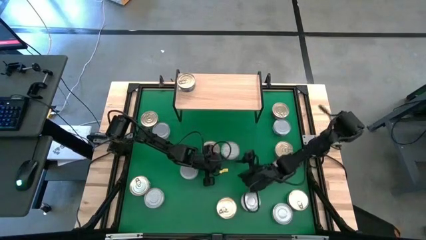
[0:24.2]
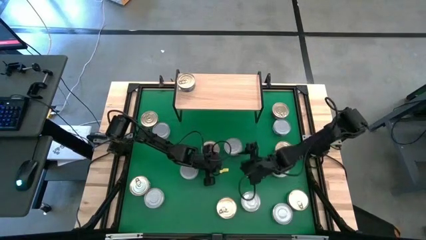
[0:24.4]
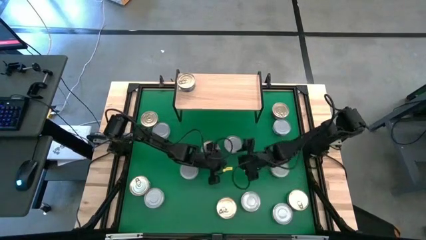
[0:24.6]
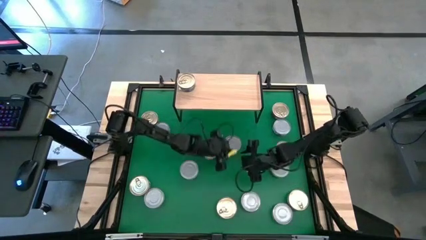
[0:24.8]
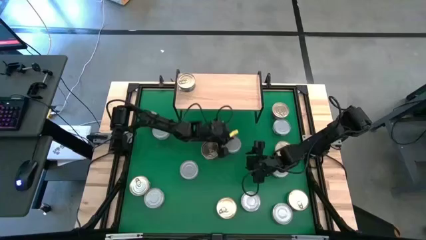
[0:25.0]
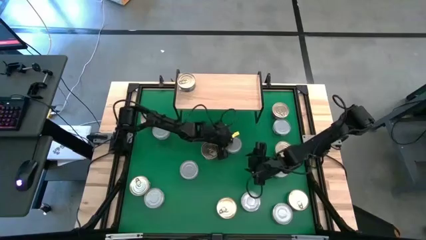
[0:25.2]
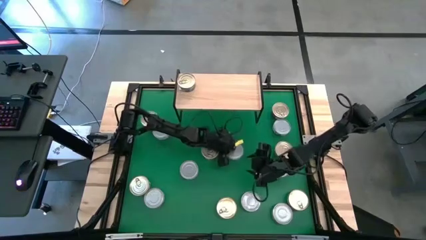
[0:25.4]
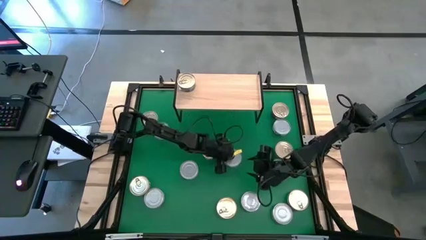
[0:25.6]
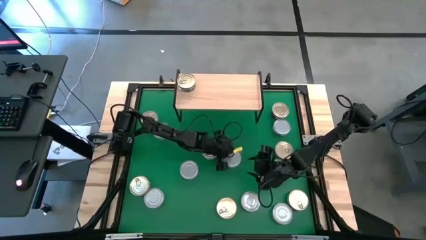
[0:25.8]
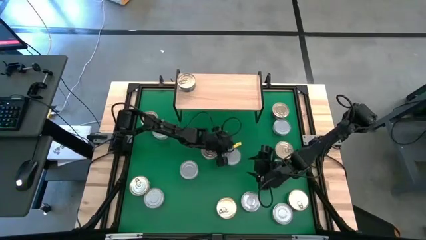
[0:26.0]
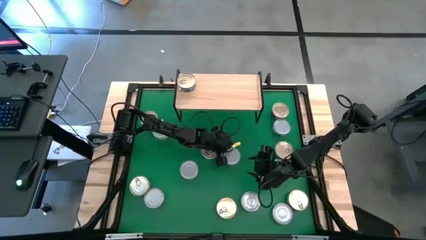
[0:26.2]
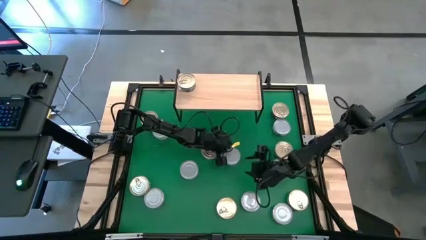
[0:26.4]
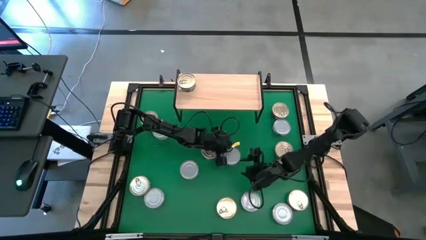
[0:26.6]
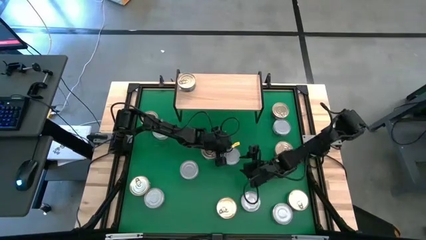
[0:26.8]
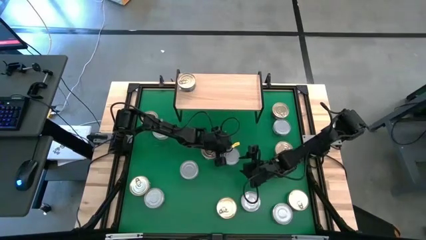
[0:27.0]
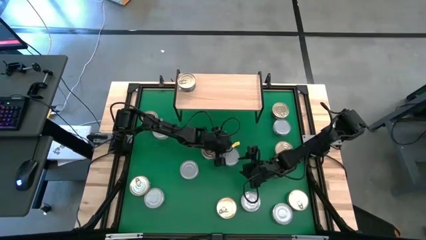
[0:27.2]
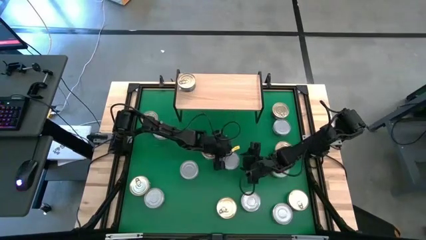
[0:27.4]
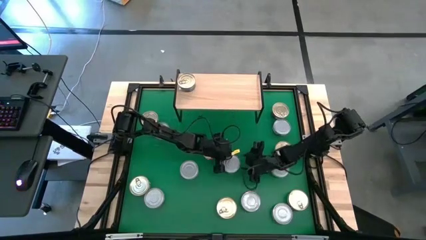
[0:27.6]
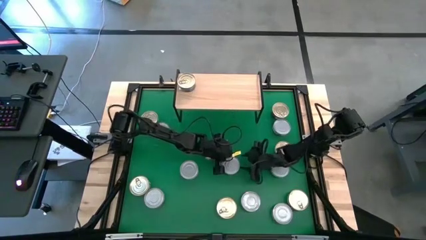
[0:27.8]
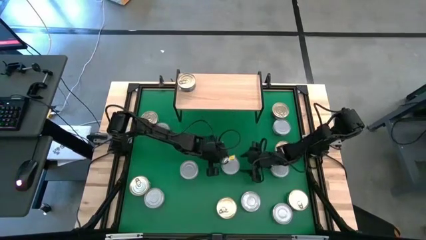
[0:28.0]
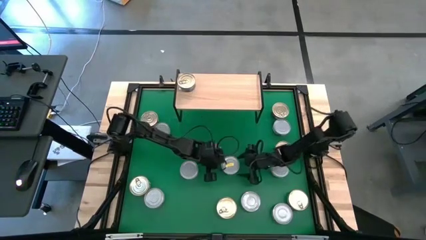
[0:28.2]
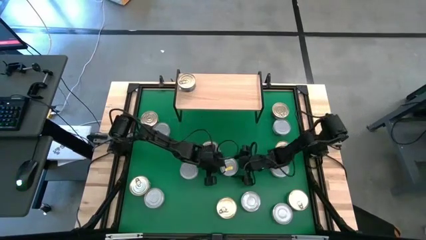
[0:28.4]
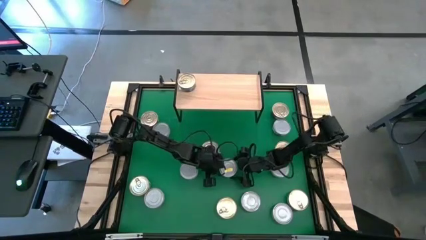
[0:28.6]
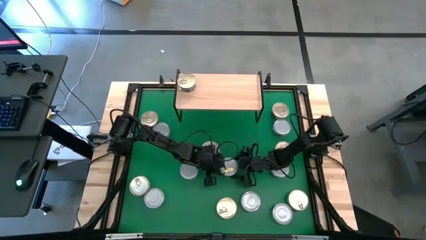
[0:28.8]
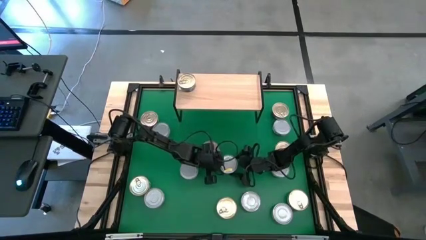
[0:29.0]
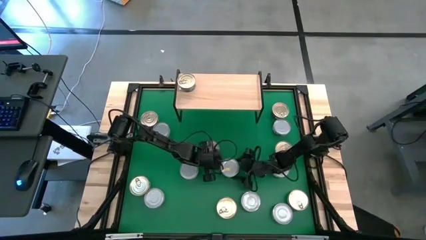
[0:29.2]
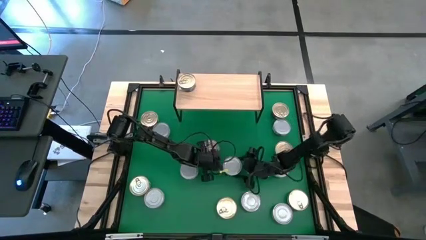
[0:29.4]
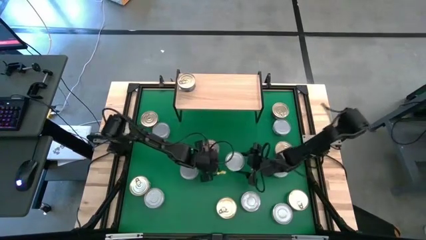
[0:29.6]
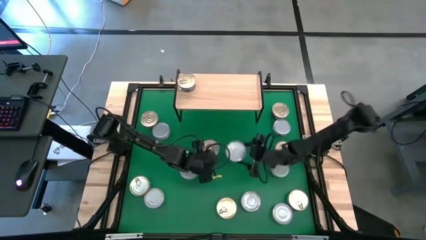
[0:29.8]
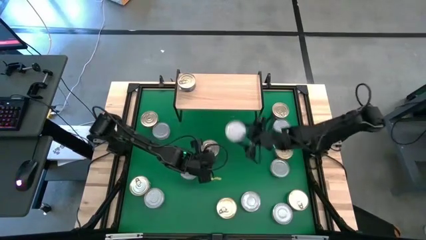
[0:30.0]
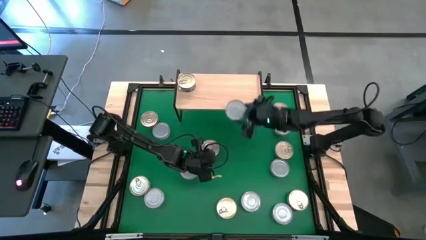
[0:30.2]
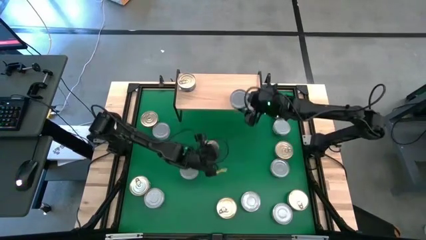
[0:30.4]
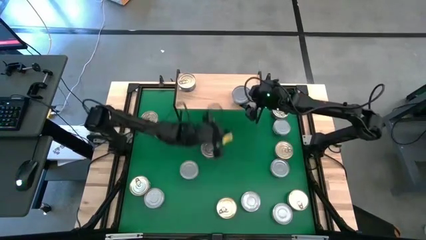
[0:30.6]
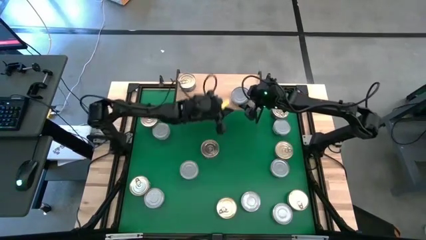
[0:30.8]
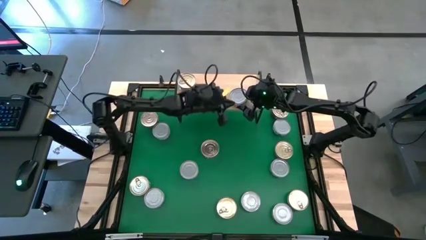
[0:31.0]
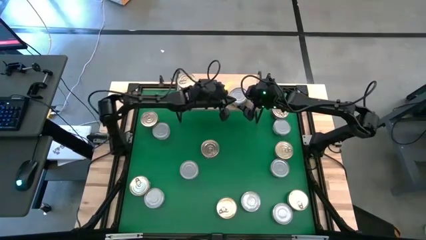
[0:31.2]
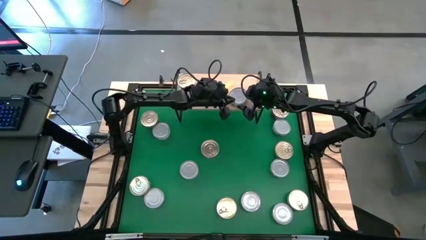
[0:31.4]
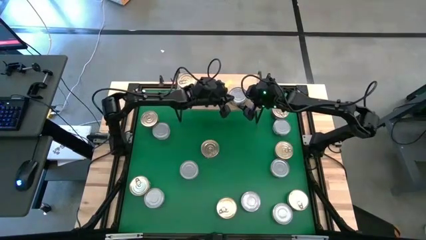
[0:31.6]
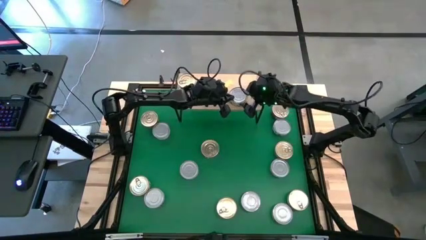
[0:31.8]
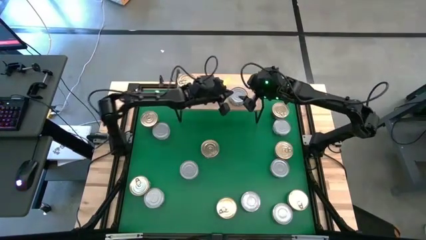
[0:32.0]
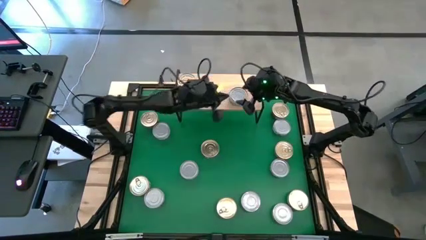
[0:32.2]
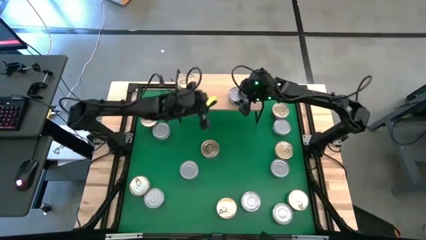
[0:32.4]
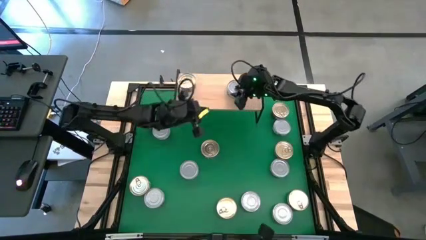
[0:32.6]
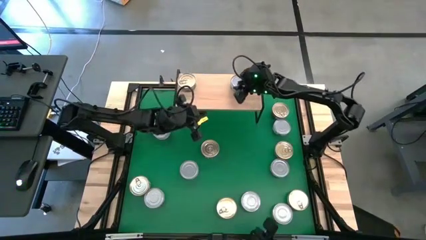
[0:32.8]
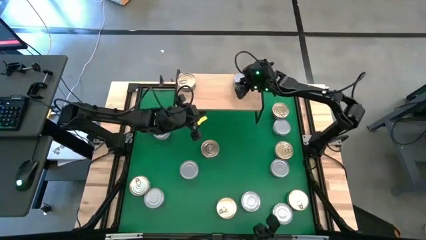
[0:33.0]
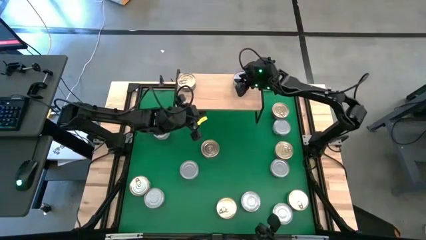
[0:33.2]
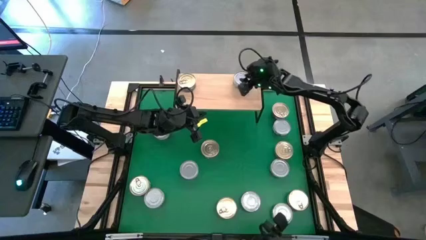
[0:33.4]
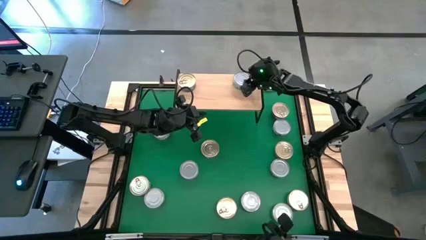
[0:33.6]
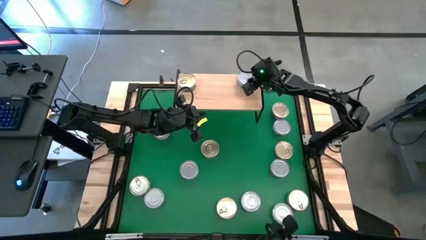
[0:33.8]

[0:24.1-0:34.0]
Task: Stack canned seafood by type on shelf
Put the green tuna can on the shelf

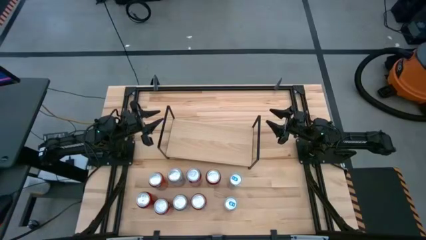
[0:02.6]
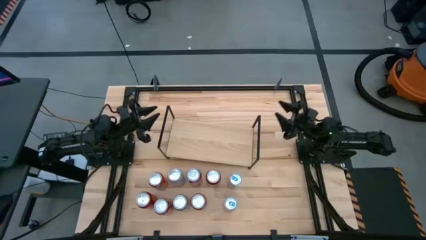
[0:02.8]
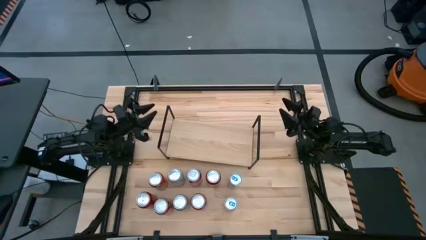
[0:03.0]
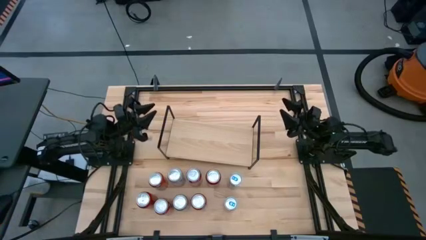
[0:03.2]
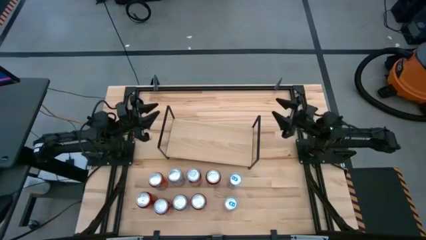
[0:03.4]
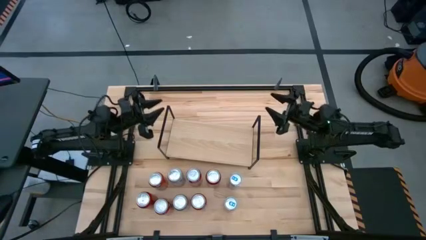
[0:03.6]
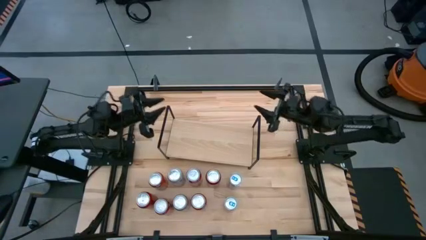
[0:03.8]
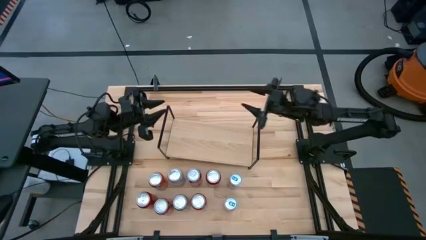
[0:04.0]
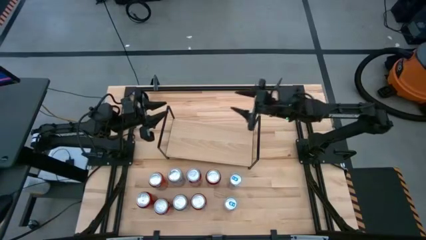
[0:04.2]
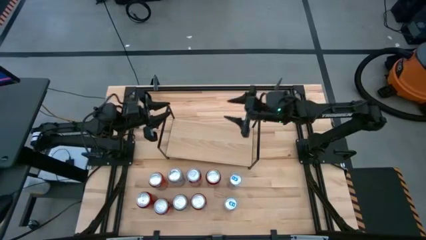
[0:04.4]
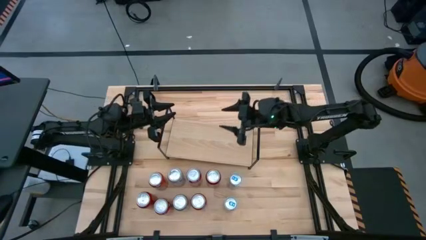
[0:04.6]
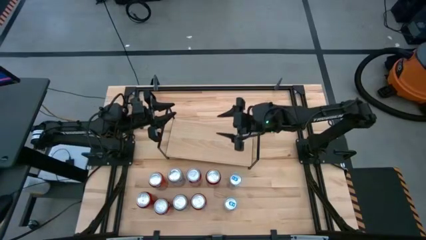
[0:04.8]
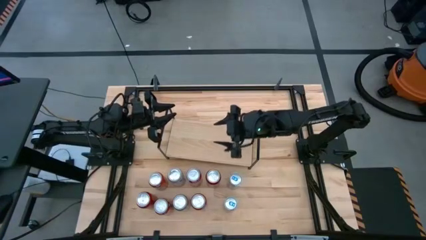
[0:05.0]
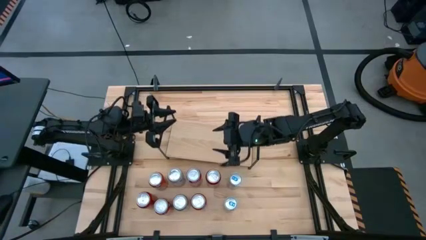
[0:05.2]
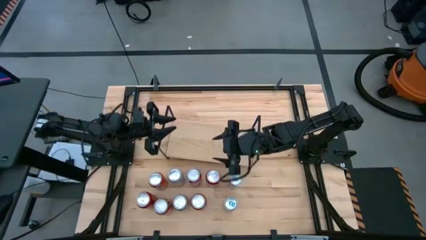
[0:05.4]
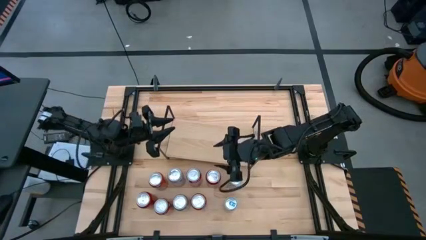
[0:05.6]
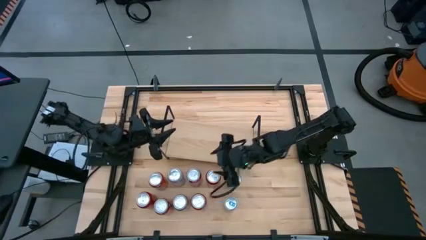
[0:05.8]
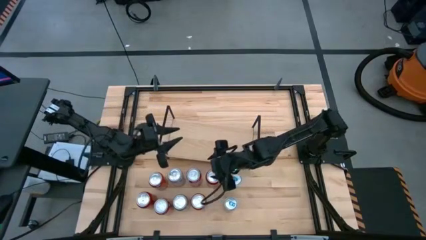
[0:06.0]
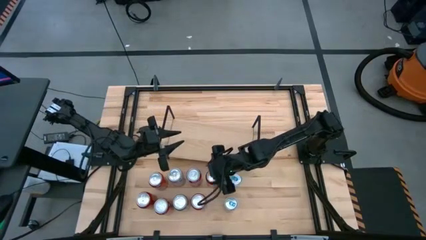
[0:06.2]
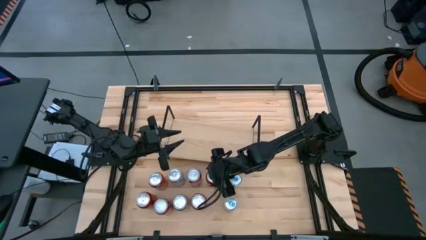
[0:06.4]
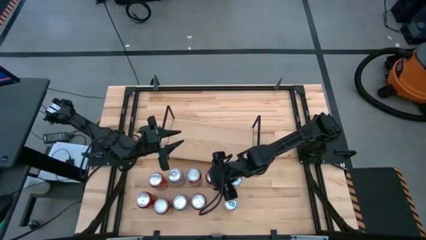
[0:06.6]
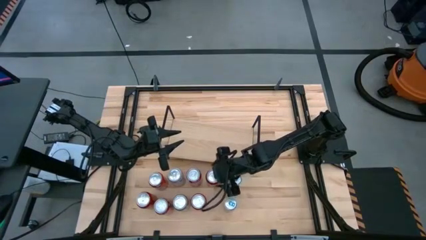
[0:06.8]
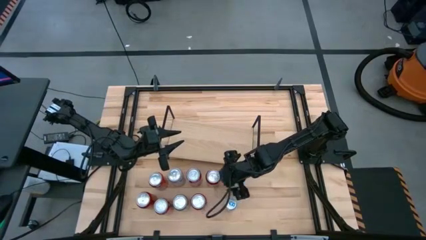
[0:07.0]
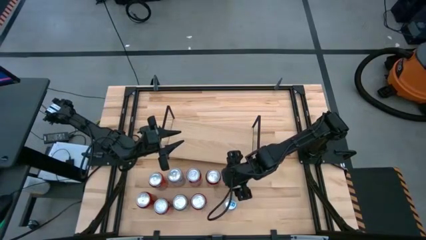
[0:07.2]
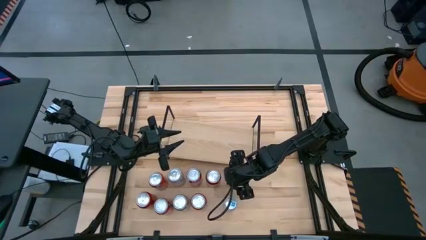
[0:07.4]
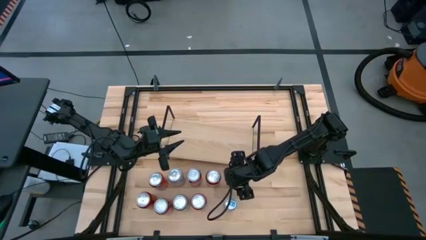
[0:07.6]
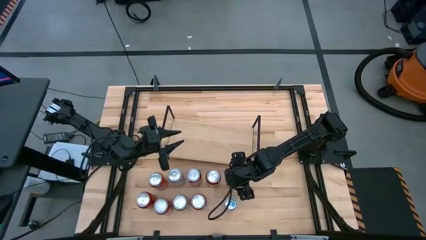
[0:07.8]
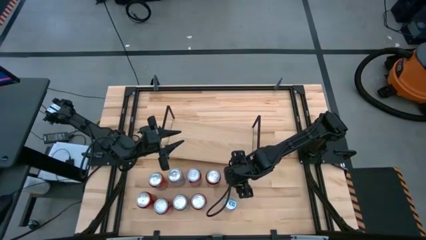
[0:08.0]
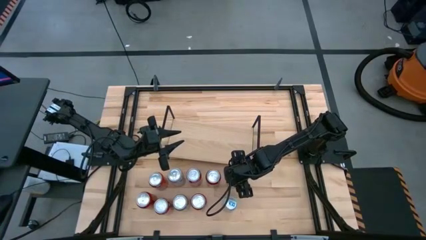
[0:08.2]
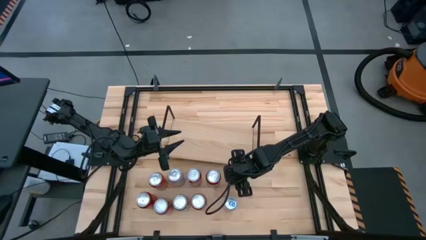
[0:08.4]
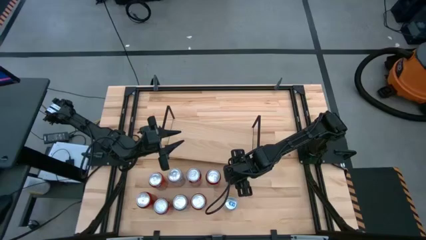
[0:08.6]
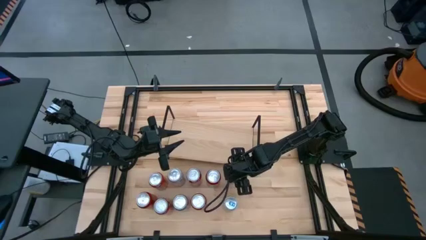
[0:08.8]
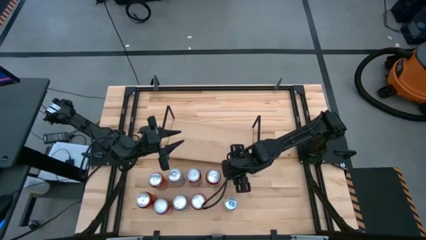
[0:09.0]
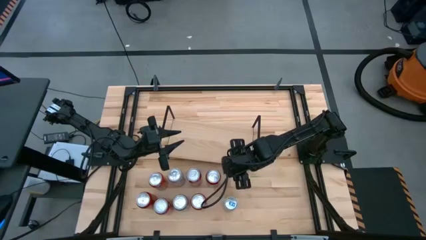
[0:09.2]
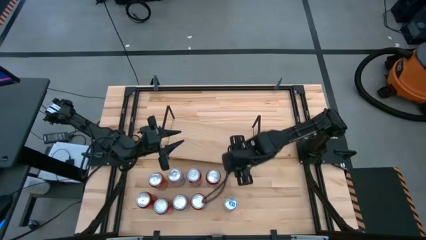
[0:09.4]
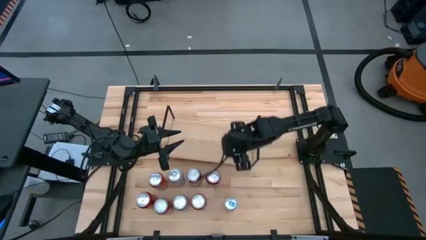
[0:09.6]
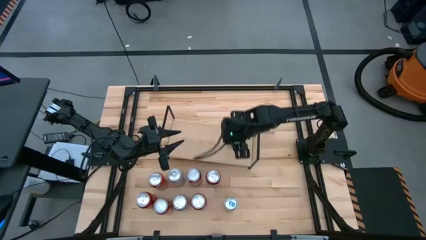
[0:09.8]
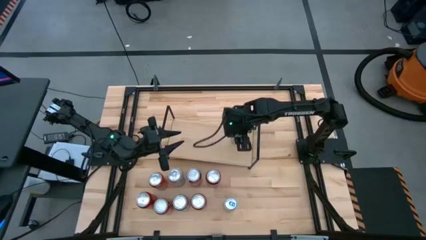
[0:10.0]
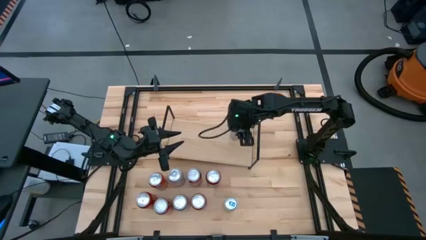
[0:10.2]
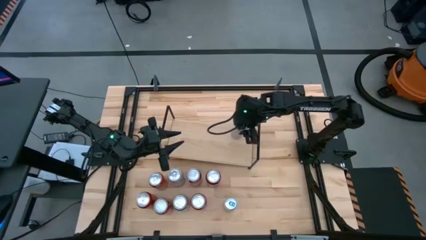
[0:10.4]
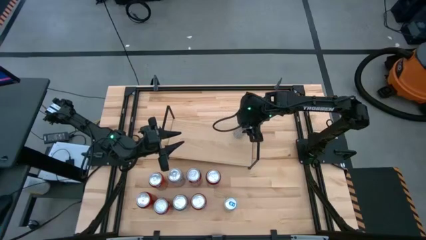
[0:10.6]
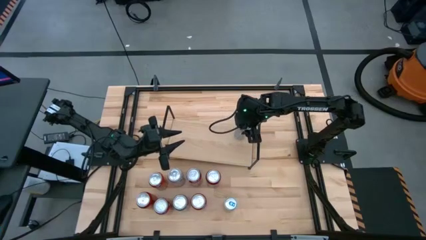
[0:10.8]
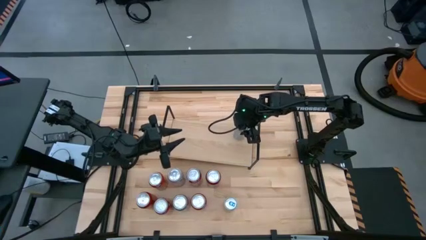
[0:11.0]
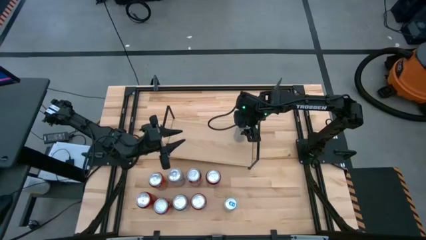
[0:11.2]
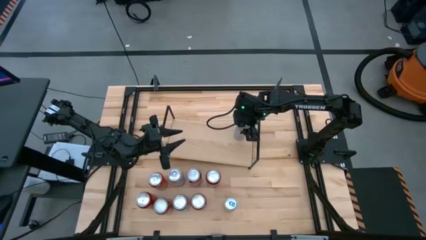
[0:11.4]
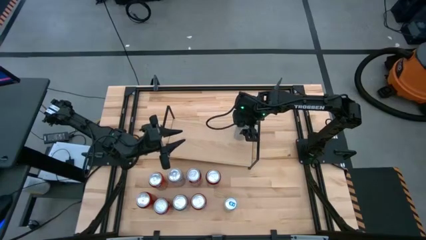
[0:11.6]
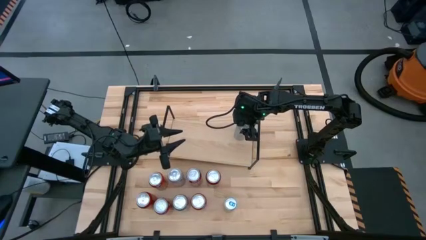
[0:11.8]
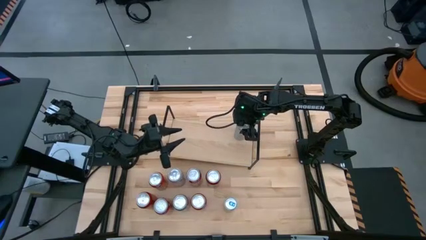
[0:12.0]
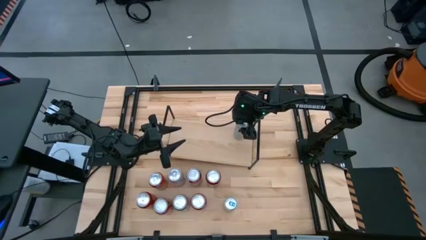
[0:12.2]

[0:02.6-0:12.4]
Task: Place canned beverage on shelf
Put the top blue soda can on the shelf
